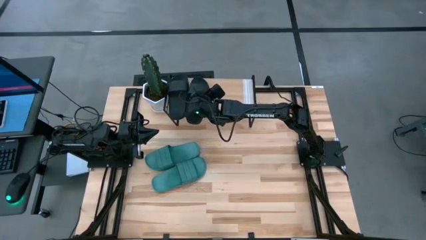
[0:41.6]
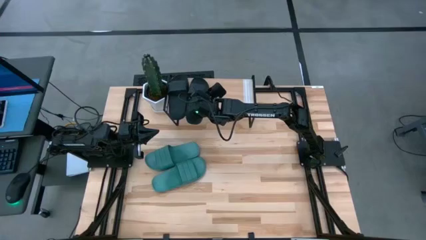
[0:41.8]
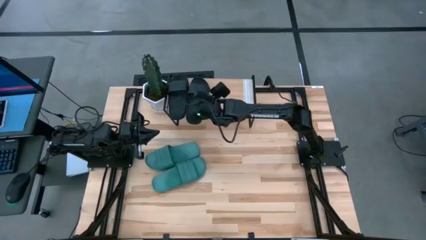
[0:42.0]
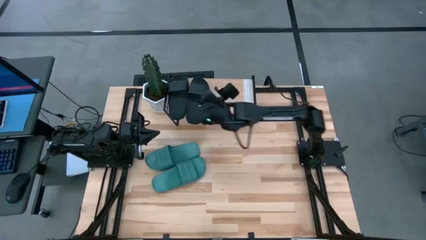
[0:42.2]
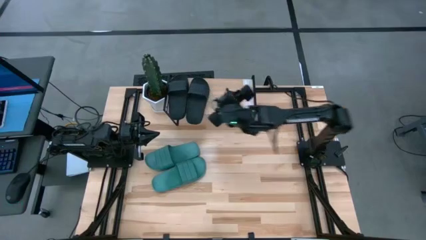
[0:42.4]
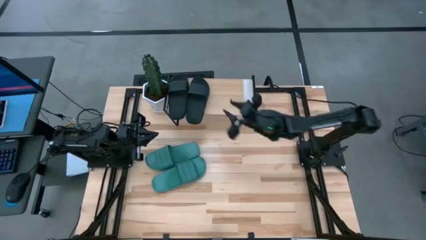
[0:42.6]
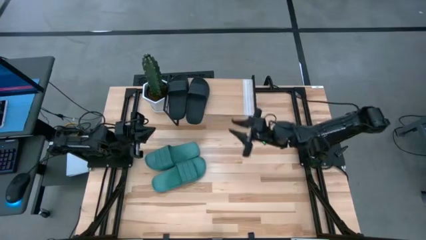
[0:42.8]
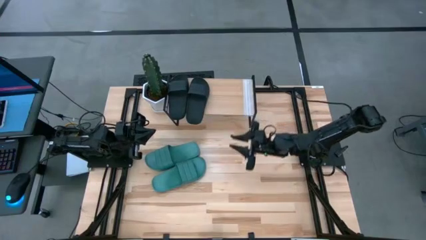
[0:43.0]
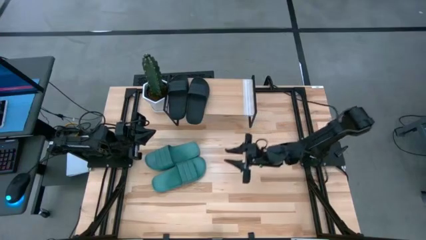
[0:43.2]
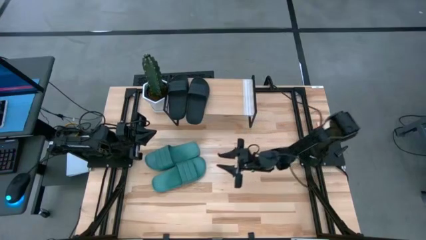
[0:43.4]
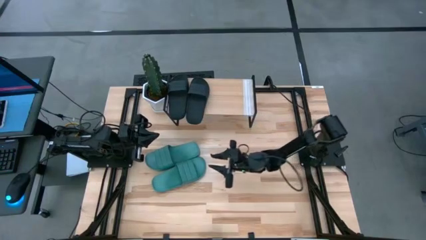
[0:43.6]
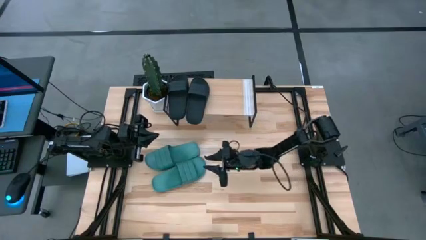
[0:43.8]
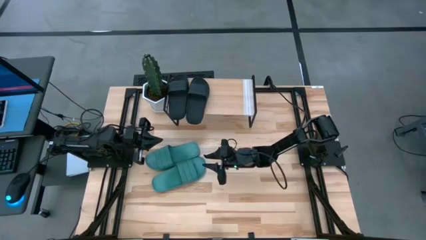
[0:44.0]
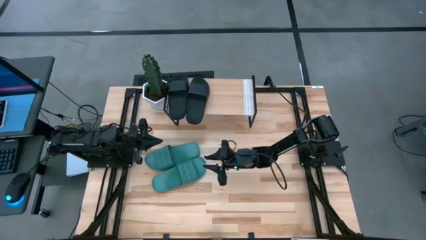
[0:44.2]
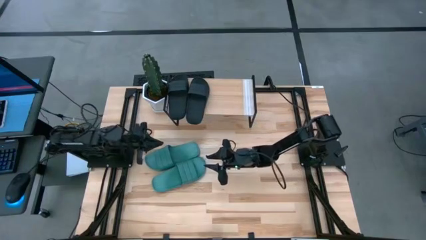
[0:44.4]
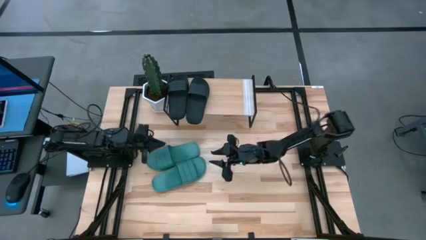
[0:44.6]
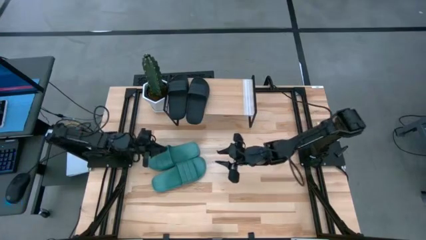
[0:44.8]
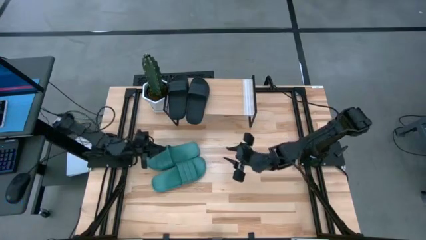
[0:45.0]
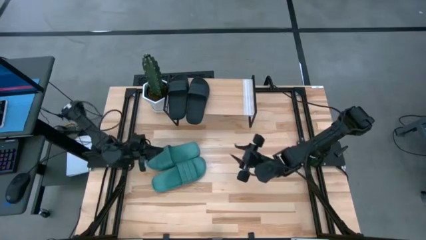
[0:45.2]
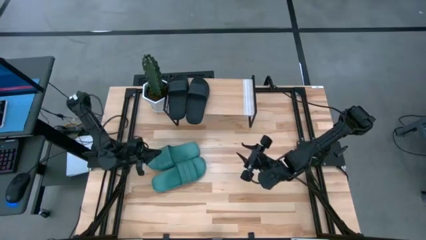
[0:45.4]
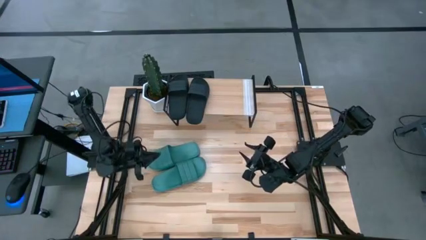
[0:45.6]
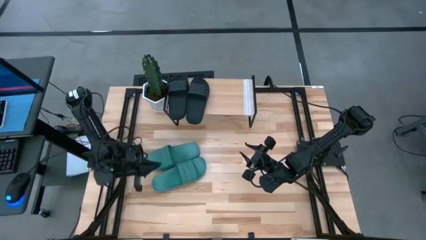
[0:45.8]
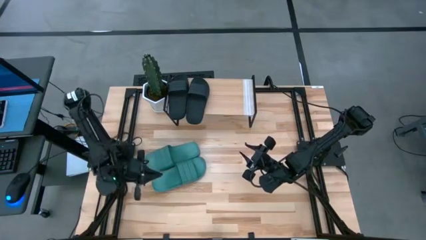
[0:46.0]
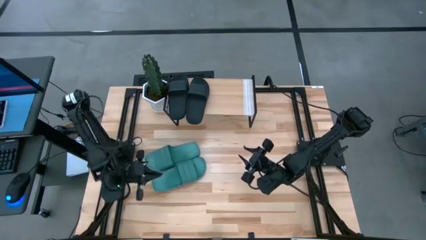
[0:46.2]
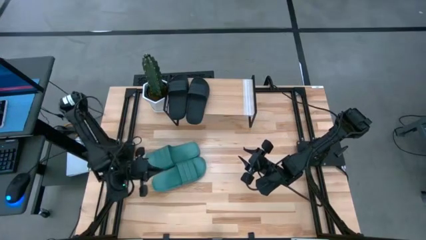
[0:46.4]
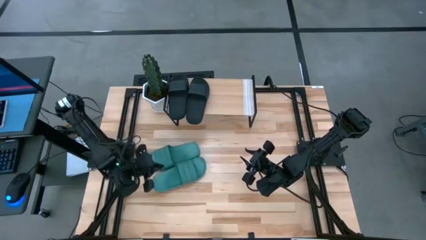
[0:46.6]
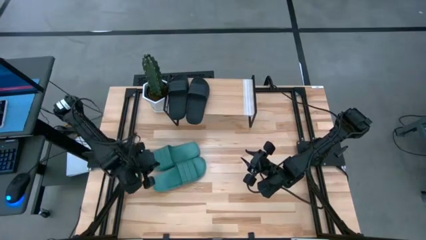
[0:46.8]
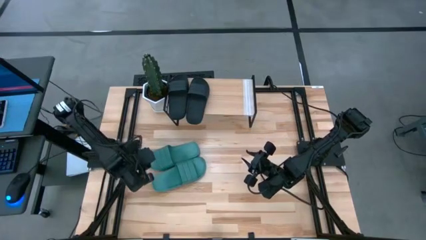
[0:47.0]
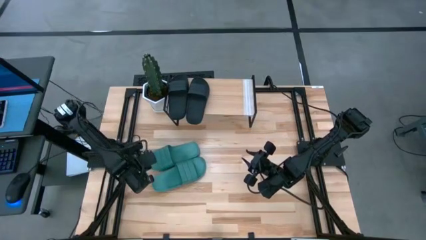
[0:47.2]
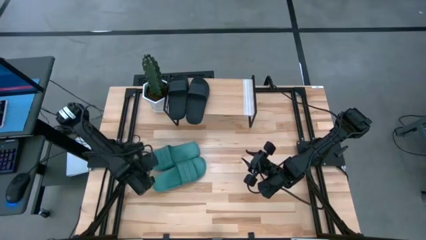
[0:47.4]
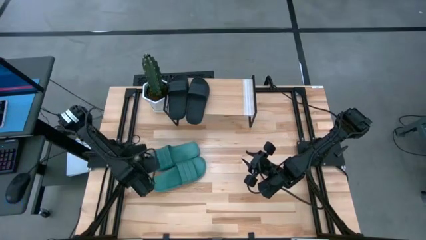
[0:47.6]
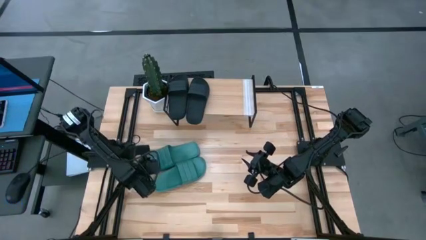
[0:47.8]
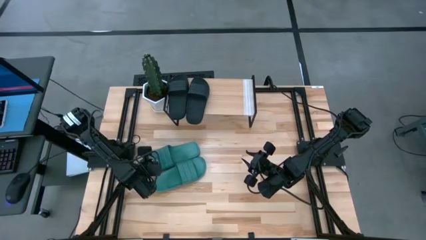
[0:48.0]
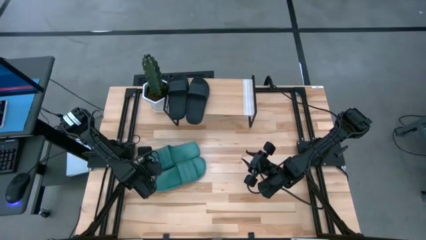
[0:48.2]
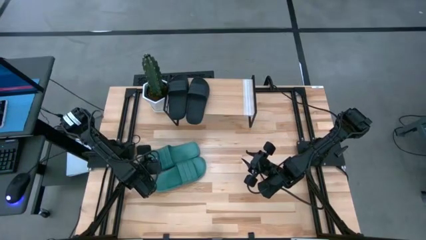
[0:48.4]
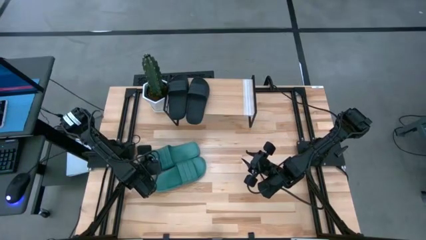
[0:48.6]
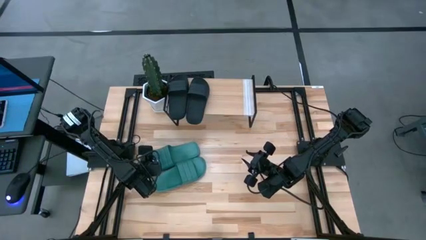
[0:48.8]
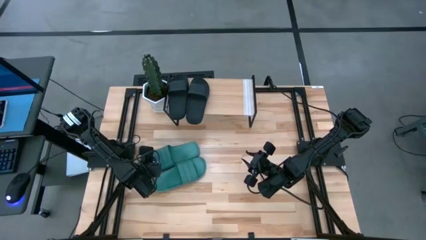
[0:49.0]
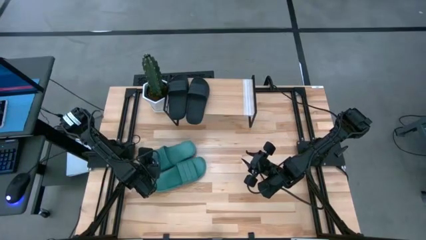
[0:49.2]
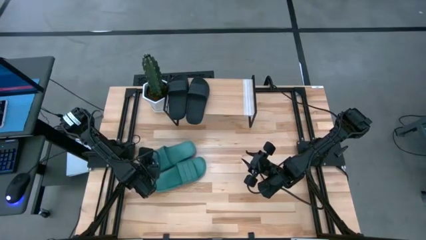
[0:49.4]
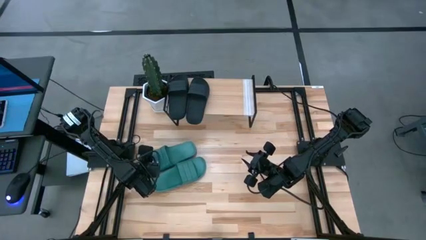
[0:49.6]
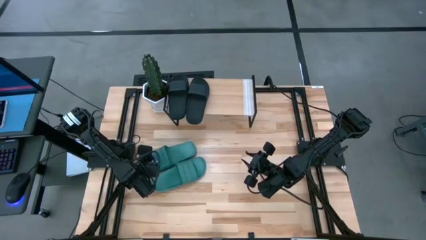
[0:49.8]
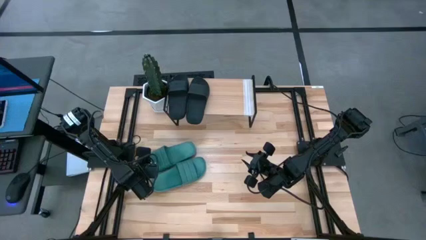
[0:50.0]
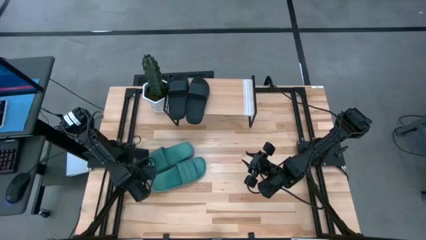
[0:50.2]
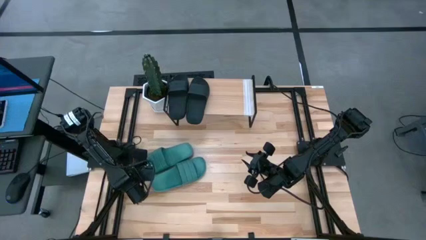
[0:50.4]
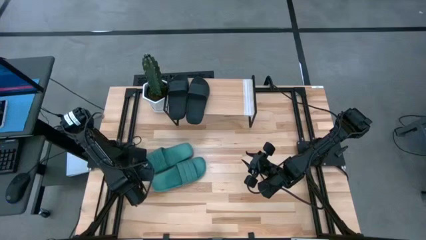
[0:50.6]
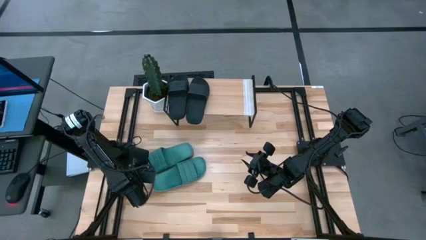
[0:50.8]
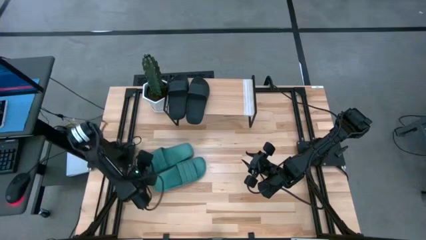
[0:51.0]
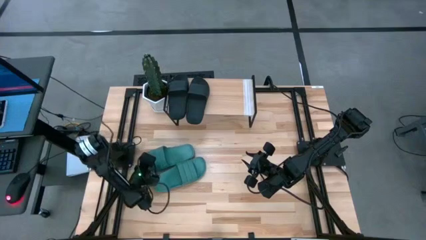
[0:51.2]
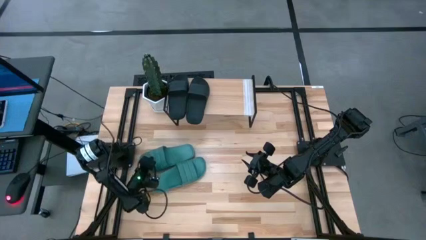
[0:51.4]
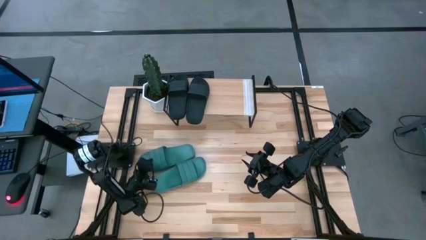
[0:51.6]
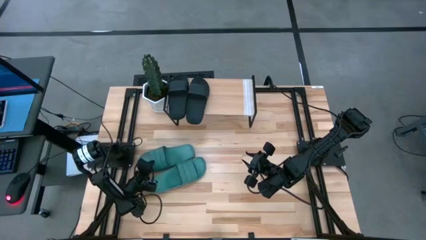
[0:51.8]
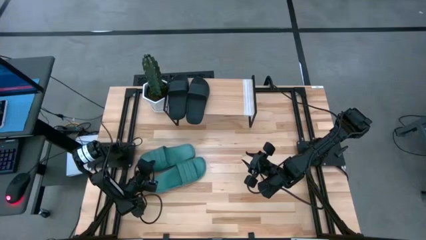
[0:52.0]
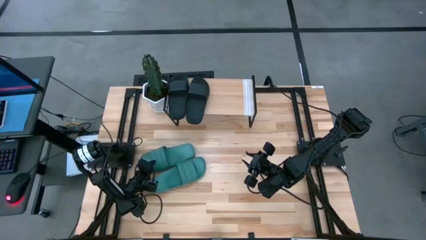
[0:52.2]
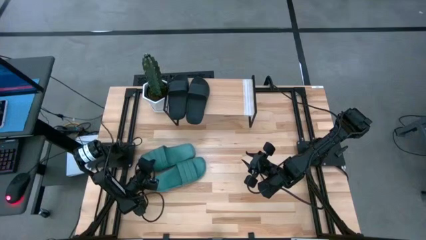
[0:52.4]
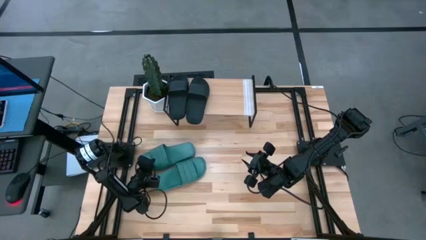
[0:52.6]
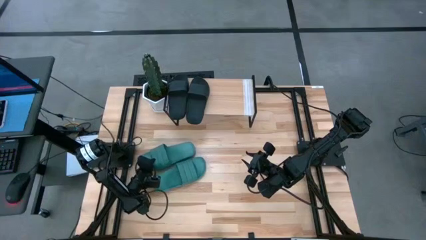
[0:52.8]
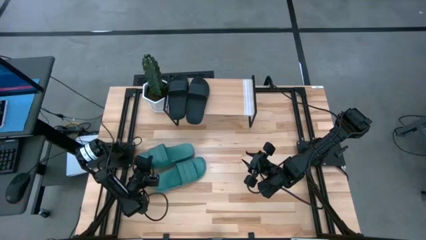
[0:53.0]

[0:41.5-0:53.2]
Task: Pick and place slides into the shelf
Put the top green slide on the shelf
